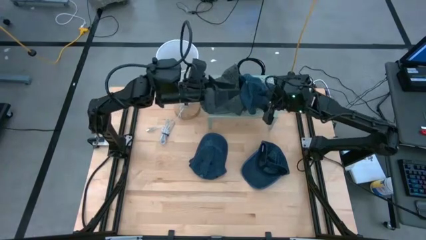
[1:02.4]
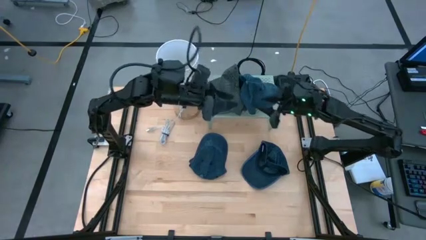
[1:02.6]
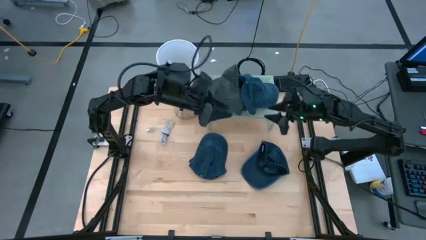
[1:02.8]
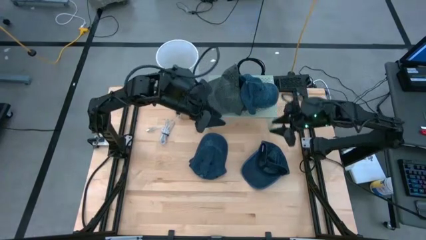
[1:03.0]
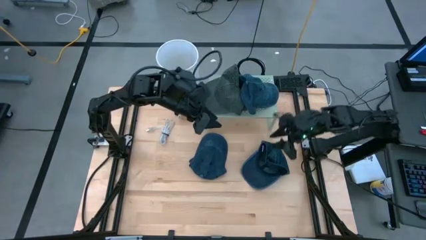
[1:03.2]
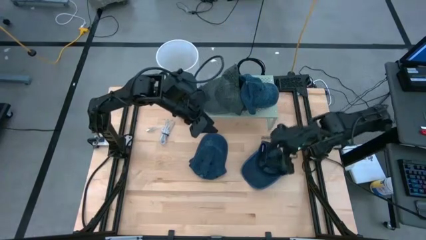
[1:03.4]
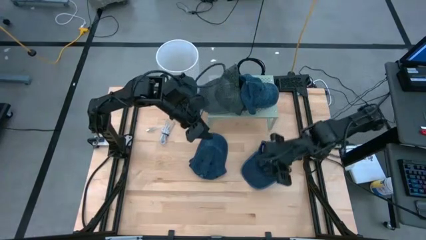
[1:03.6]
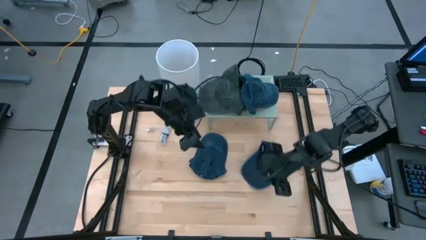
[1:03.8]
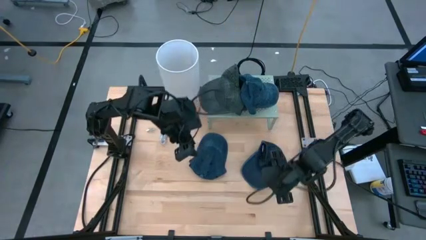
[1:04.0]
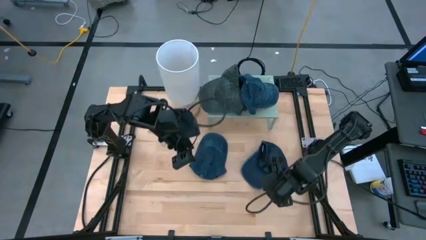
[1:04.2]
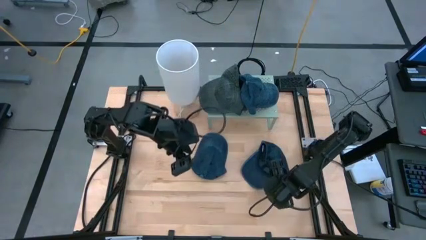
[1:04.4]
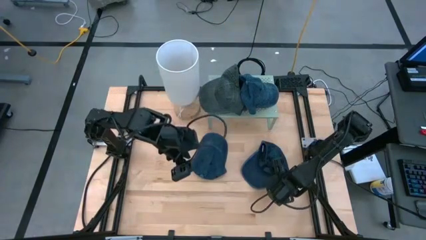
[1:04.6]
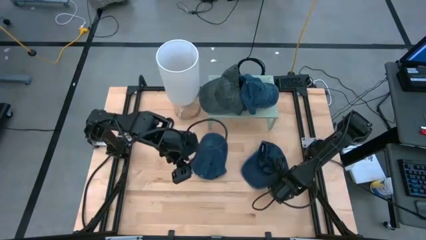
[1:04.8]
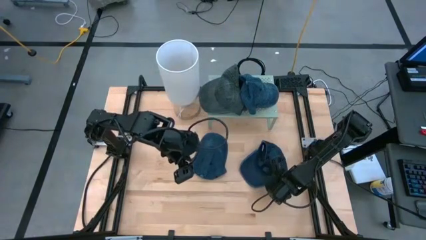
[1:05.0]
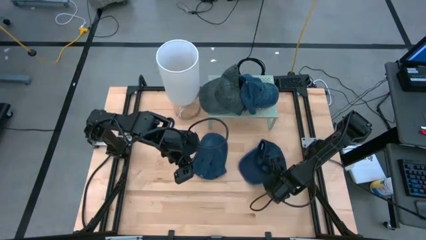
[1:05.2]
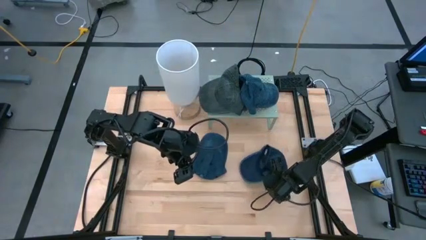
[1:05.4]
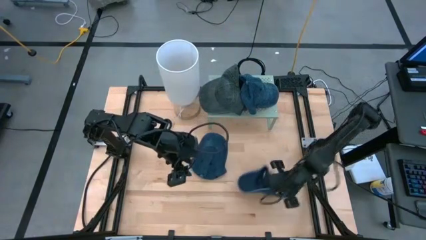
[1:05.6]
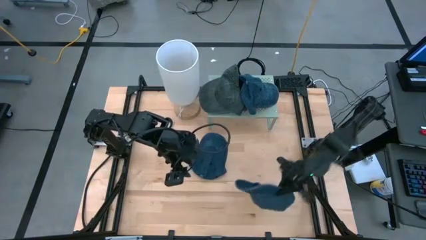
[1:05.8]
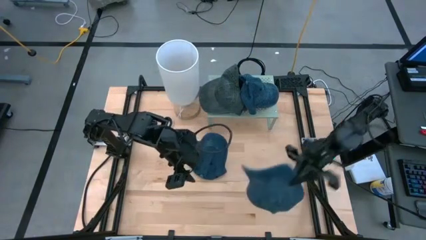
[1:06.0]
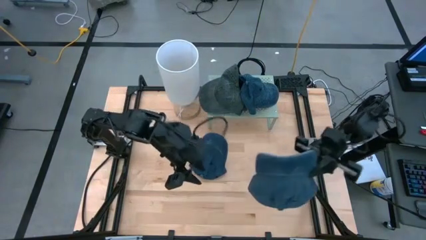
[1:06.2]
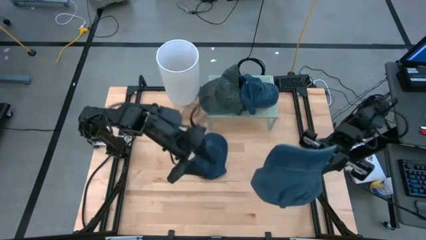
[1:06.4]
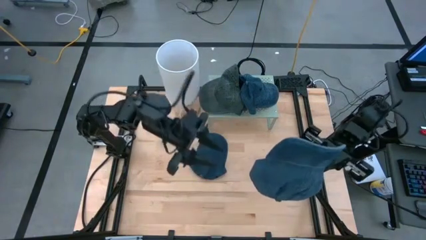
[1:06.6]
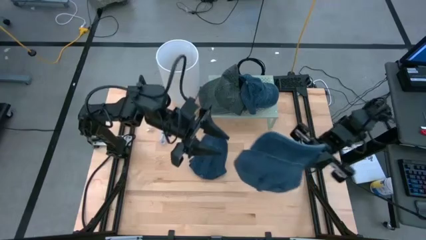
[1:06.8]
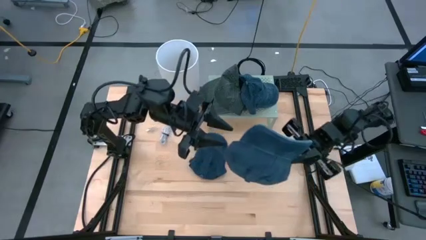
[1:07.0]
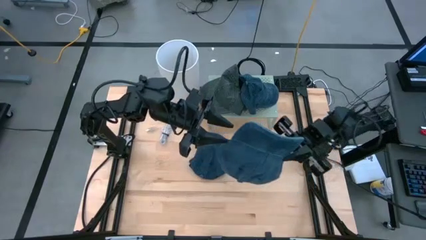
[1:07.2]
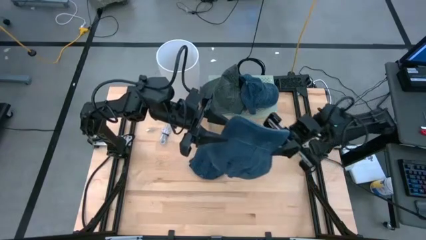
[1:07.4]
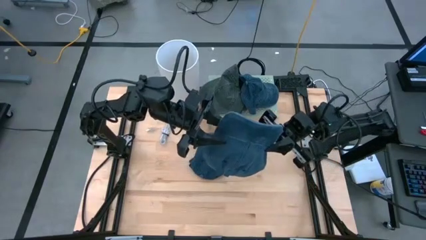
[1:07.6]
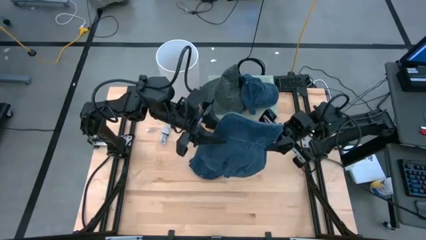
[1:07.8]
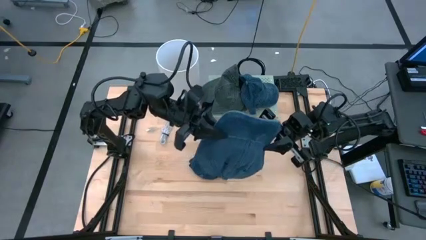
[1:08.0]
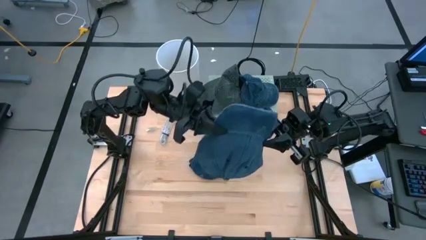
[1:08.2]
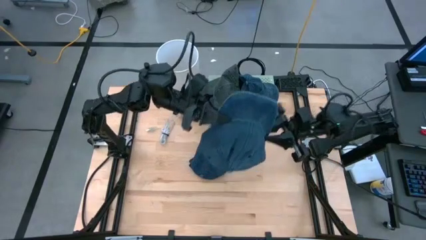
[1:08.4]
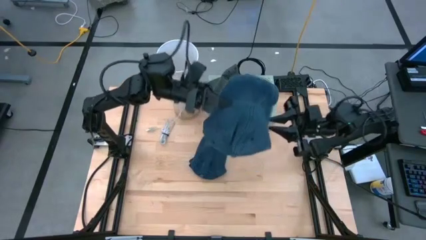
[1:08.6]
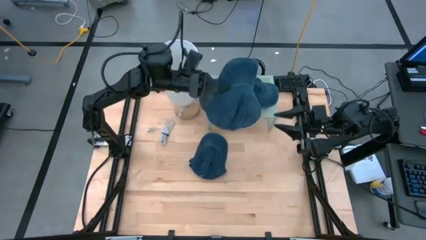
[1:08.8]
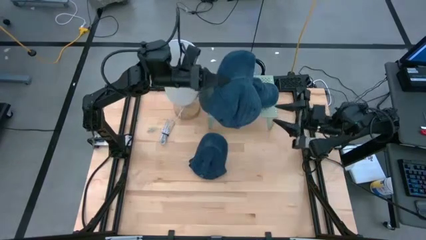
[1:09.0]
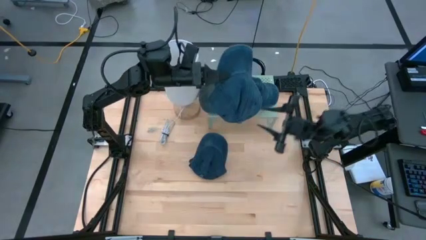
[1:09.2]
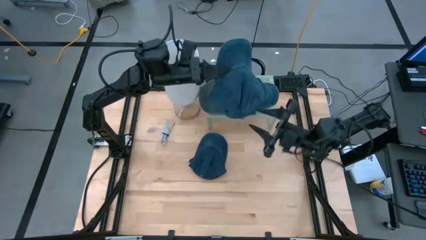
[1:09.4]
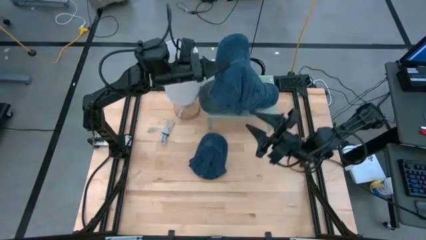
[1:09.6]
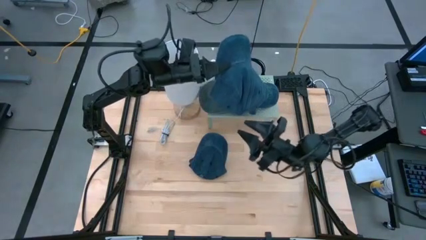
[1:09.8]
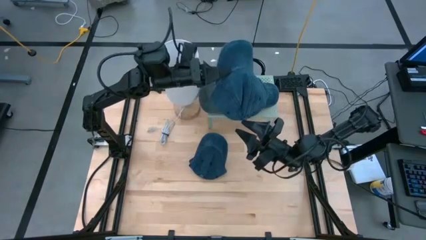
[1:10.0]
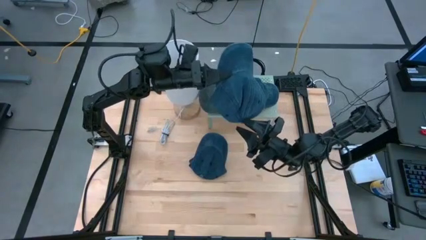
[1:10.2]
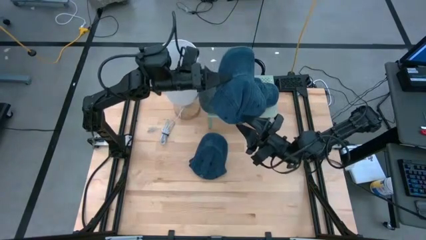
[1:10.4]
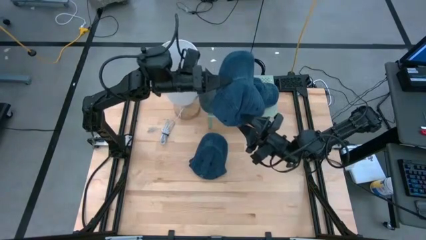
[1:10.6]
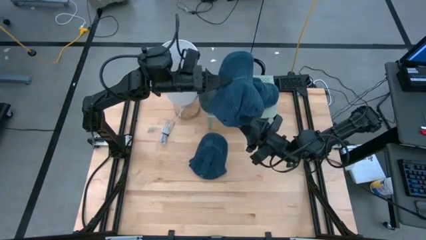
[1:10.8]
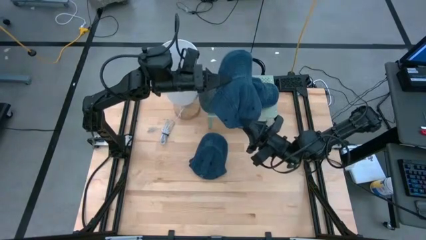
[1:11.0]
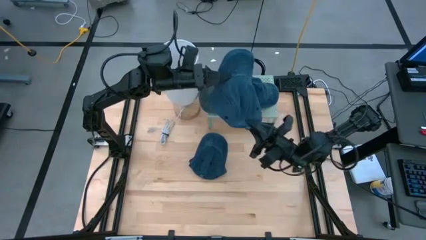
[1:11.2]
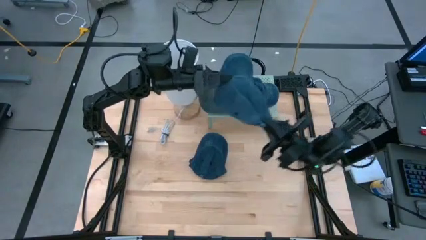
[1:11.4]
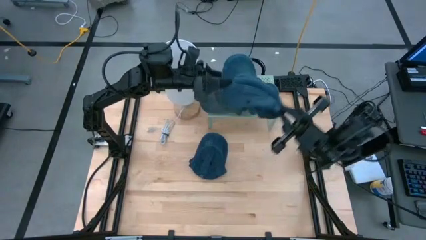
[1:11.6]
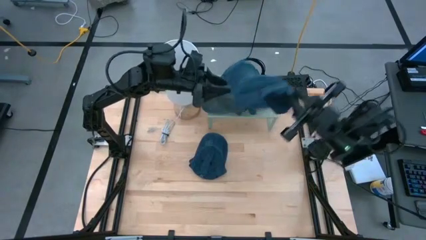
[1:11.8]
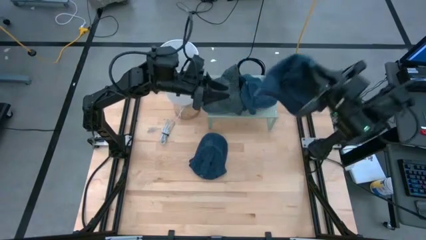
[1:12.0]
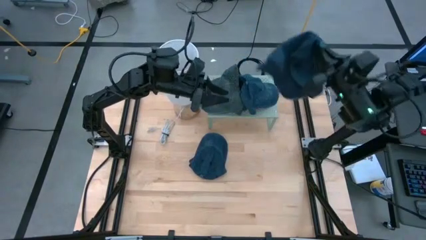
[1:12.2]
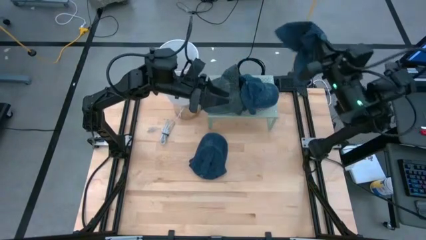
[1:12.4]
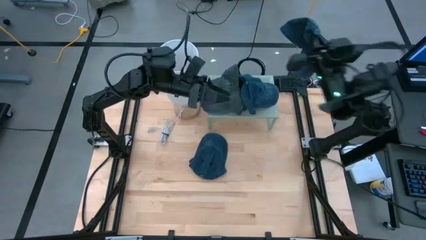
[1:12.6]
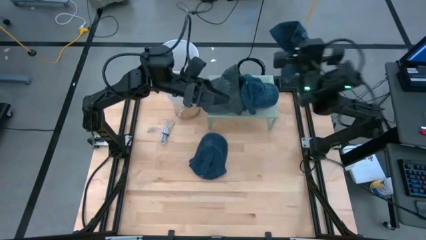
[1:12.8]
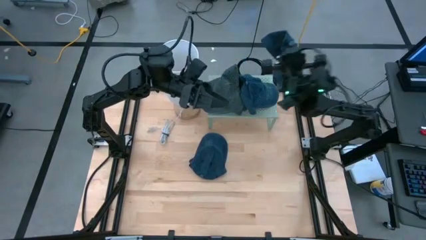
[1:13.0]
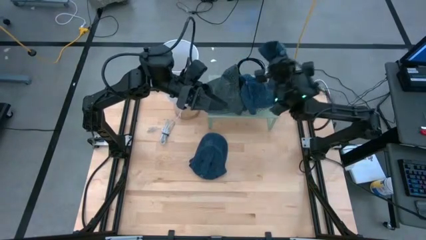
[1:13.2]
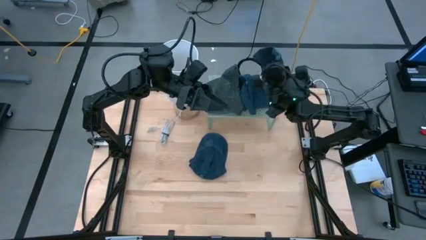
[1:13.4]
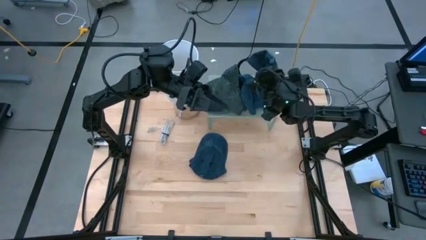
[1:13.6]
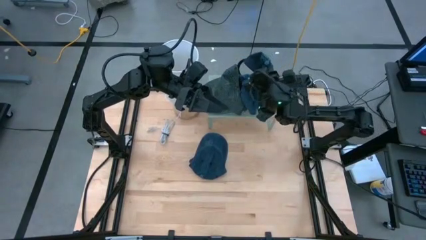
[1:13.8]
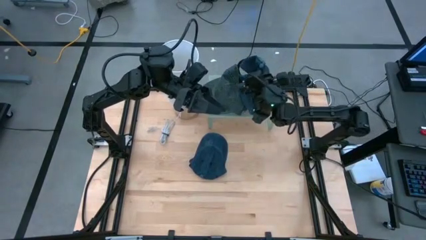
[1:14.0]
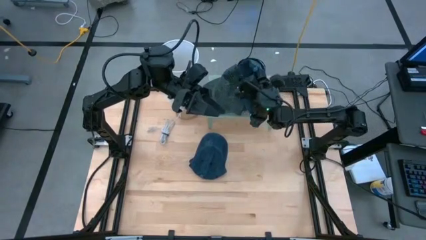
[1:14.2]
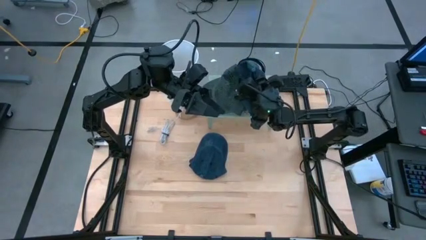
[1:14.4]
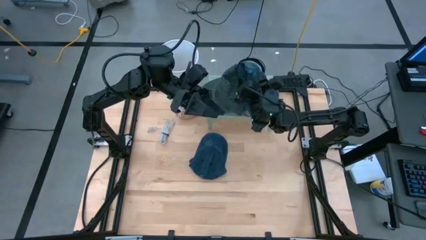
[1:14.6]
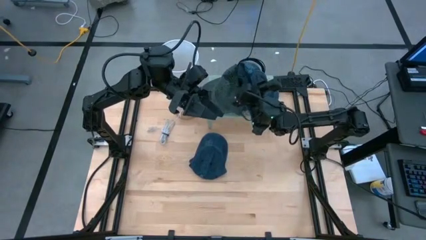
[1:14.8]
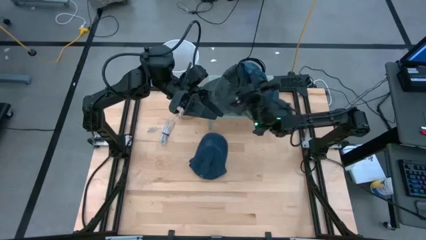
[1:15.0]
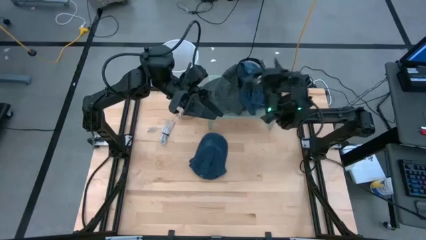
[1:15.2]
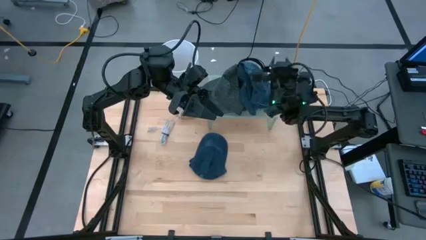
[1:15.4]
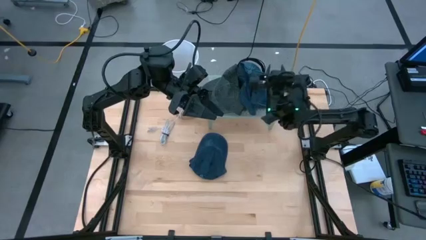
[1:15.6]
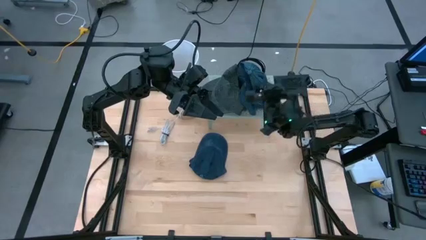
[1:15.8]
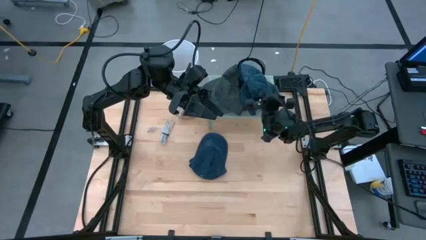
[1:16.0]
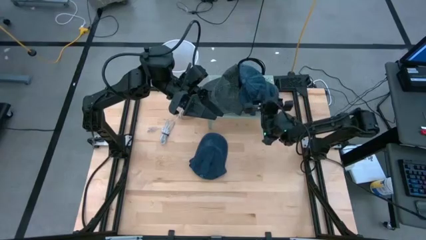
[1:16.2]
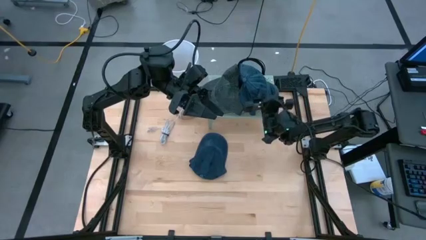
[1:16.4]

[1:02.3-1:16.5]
Task: Pick & Place hat
Stack the right blue cap on the blue cap on the shelf
